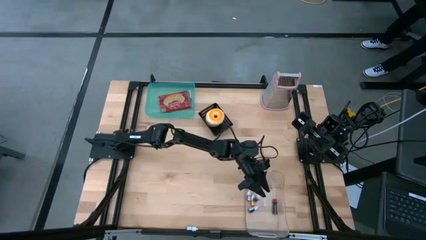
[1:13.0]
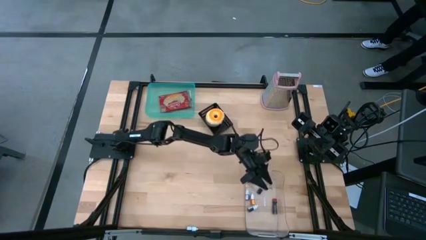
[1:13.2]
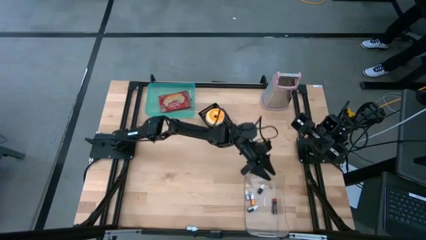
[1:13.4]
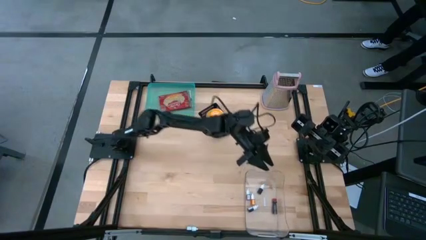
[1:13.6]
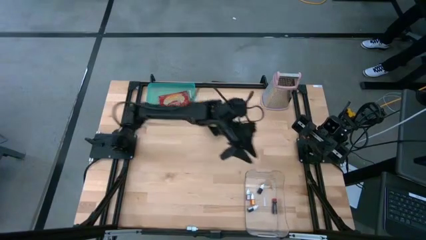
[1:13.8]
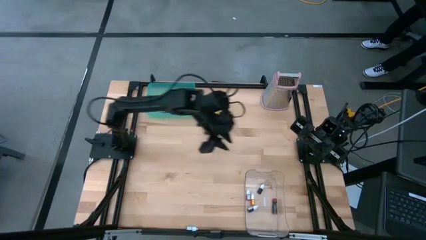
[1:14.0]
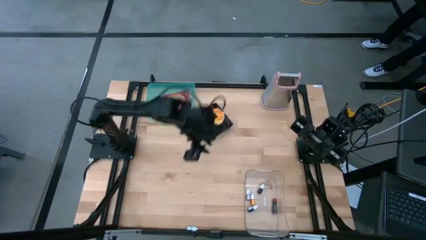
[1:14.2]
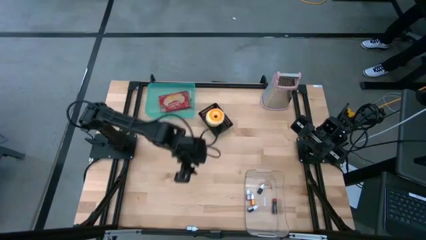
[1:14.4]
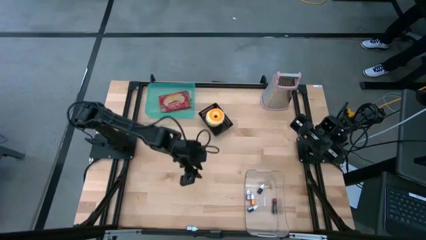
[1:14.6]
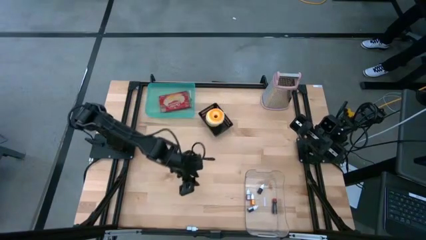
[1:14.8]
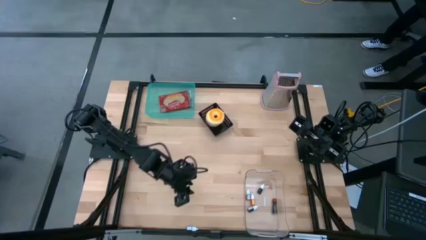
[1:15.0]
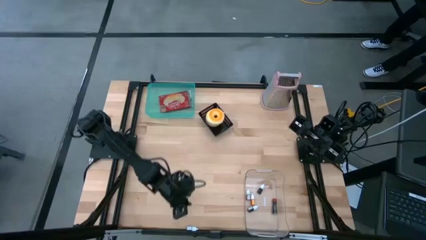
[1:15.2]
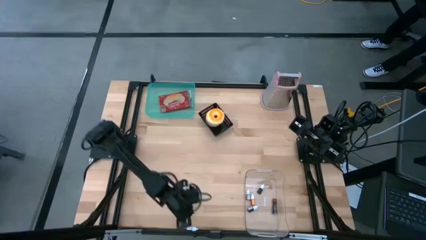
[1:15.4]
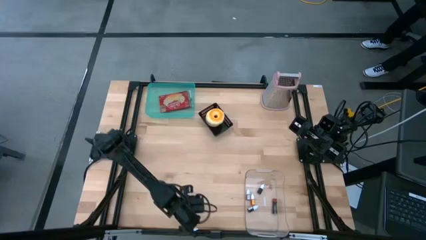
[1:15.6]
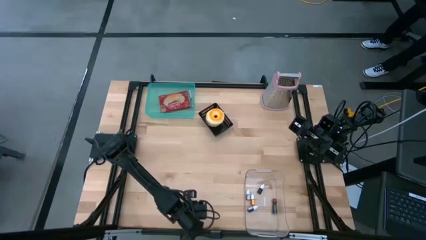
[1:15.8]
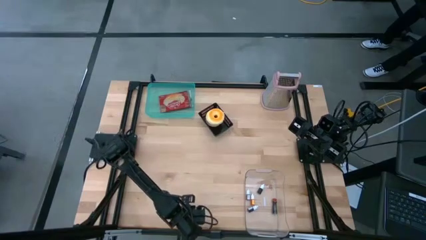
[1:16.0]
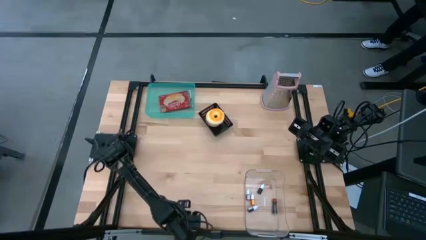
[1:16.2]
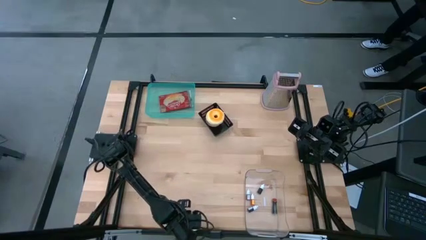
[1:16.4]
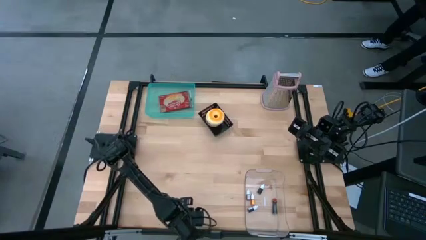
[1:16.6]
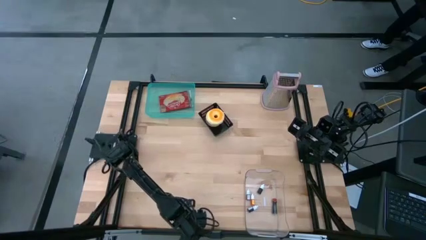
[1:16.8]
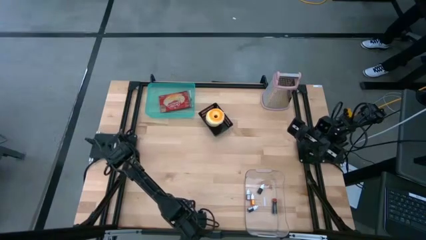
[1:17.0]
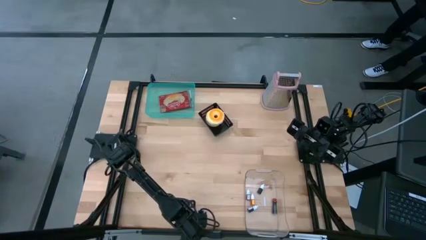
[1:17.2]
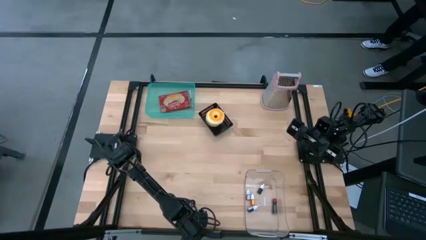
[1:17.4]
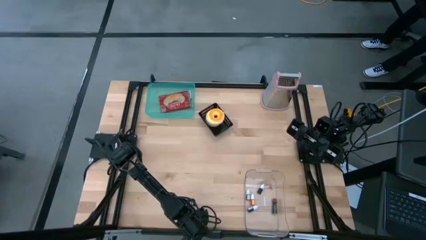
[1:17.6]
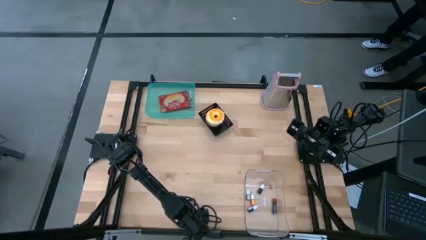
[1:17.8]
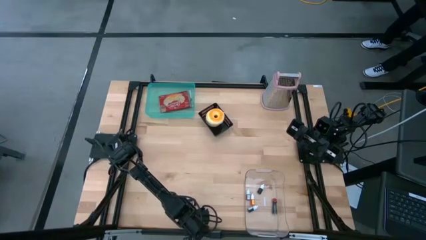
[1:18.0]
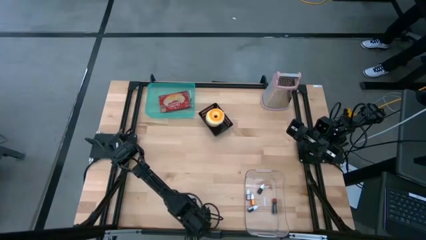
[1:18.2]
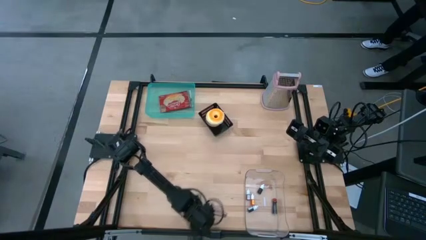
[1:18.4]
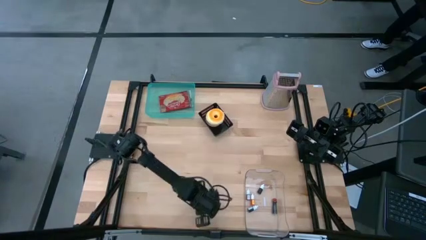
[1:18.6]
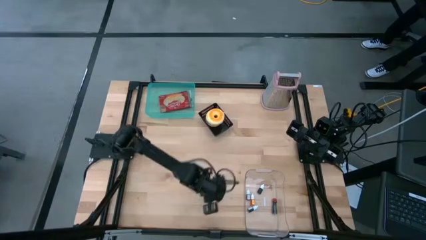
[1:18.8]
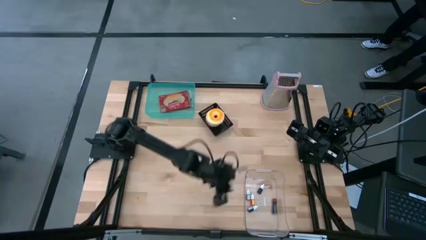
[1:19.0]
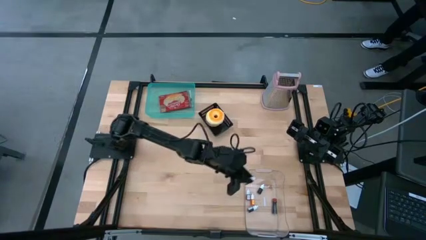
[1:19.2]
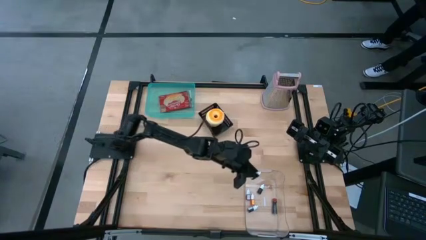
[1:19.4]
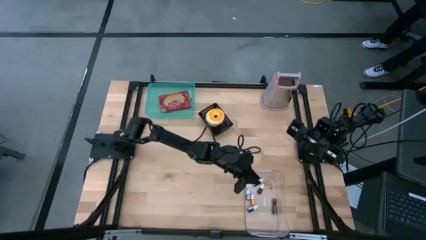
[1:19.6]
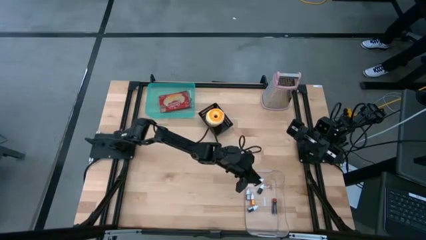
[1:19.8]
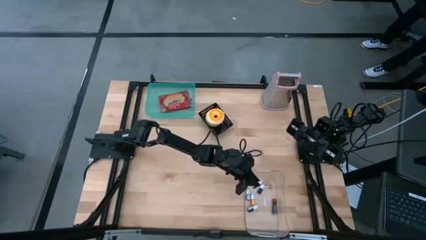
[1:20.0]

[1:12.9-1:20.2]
Put the blue food coloring bottle into the transparent bin

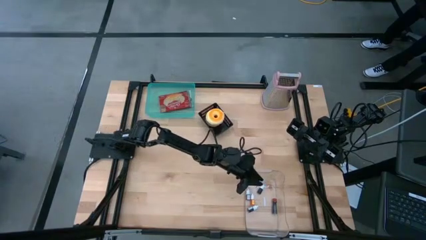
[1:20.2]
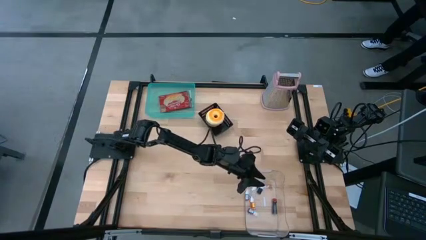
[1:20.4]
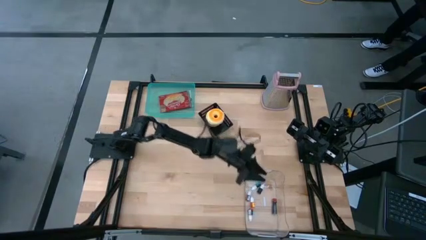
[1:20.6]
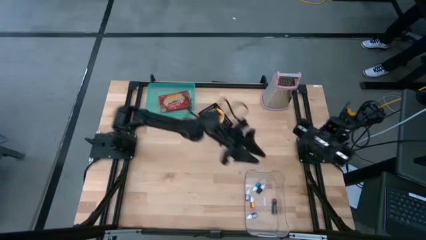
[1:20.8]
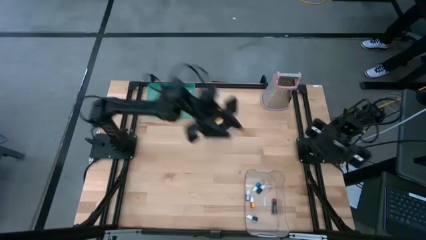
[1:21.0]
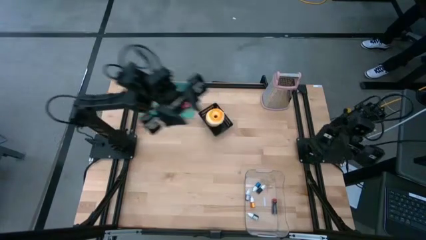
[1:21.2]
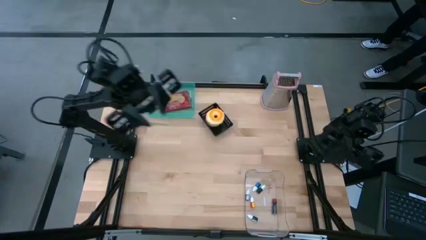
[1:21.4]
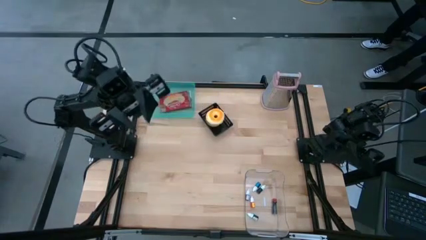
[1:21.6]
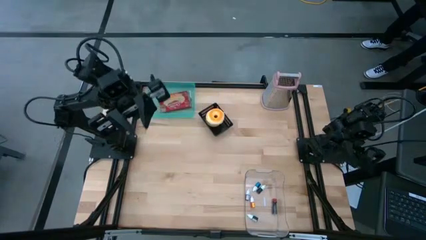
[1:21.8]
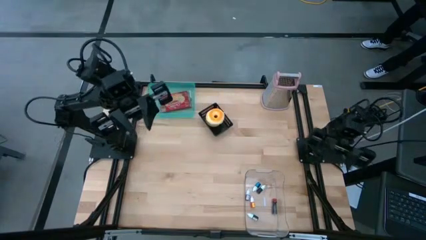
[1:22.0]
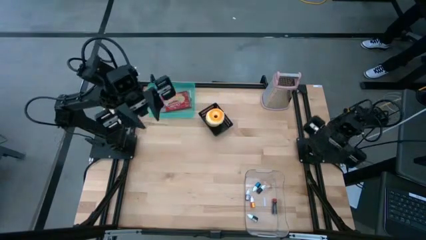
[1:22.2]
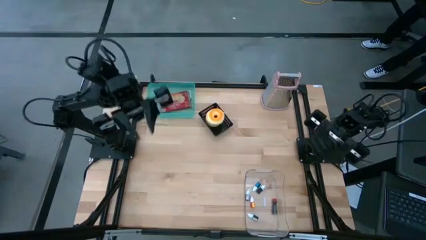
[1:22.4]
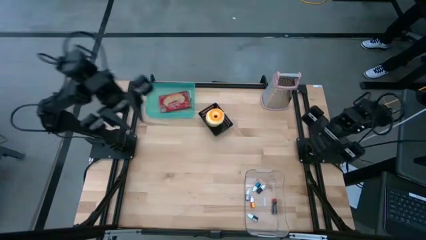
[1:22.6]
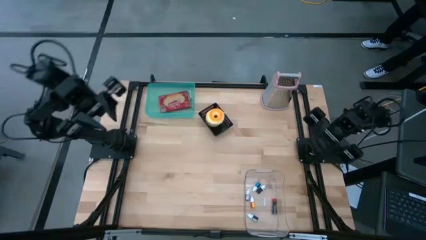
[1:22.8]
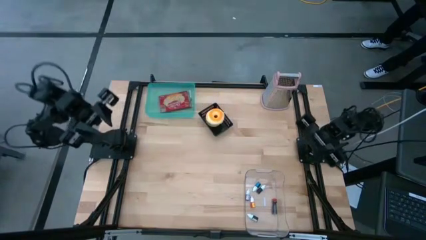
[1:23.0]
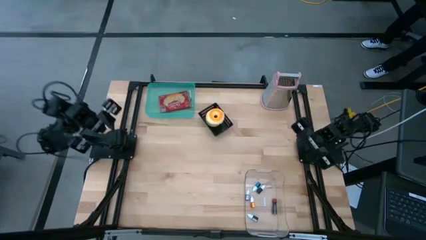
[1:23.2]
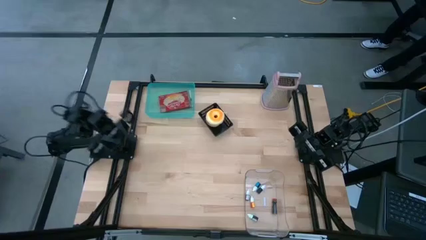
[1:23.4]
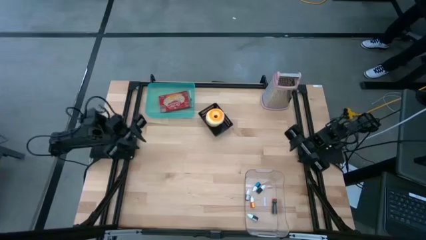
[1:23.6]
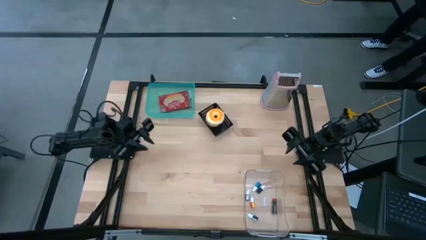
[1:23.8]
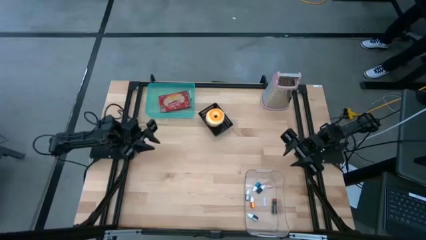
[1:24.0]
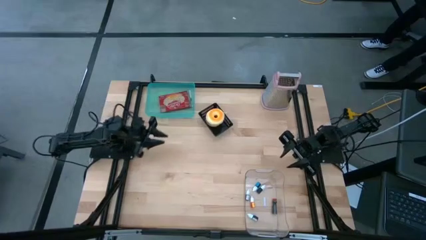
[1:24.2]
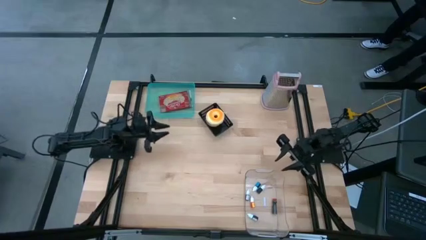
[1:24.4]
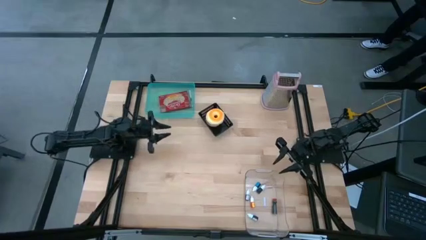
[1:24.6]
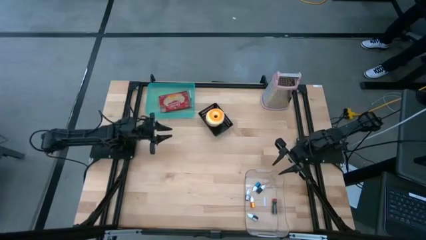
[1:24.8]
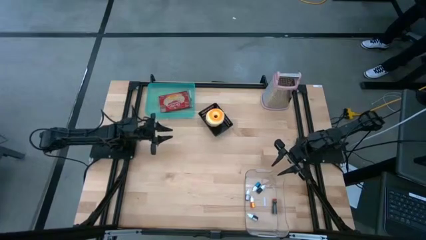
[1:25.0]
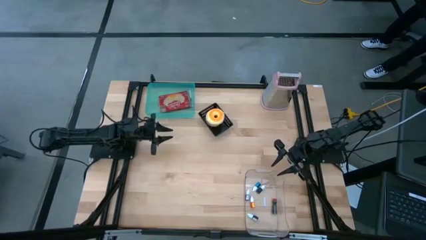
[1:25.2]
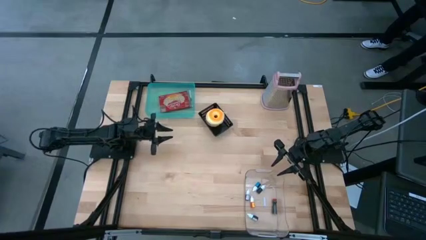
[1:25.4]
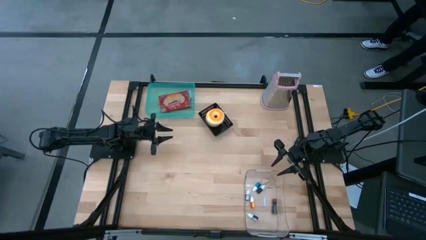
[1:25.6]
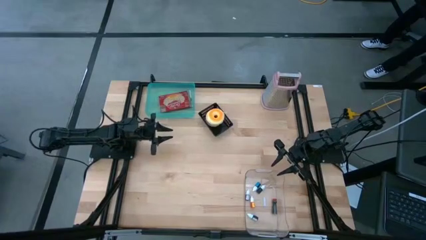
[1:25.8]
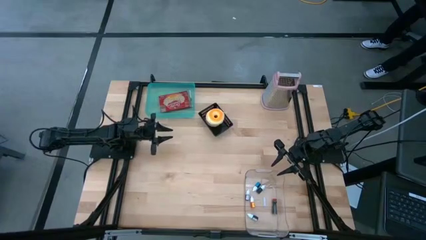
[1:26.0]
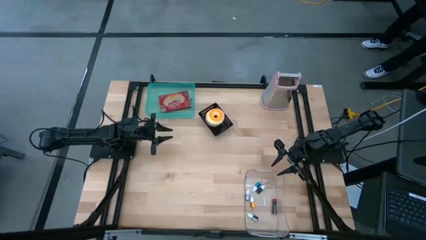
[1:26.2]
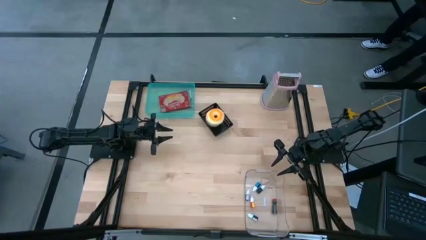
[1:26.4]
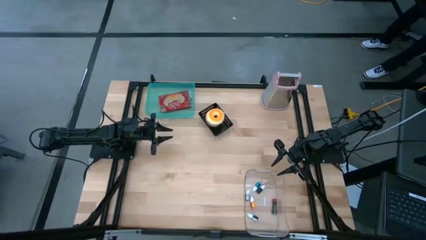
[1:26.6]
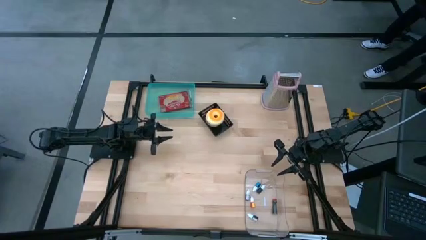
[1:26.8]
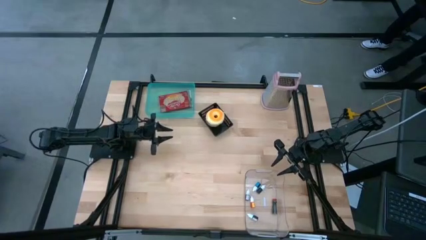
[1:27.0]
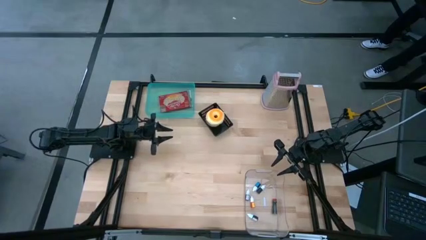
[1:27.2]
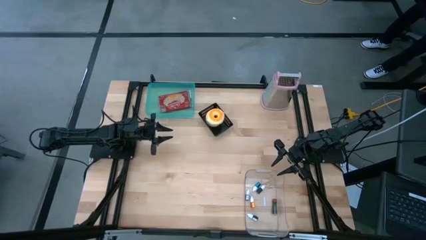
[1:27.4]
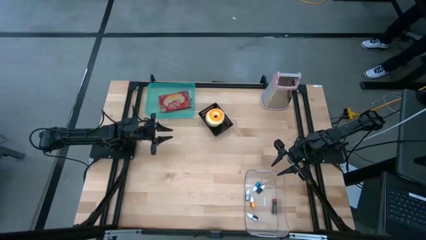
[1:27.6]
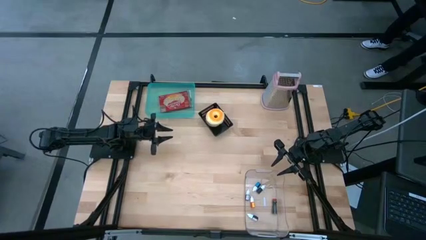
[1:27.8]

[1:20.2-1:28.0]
Return to Home Position
